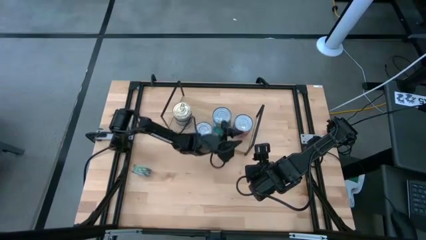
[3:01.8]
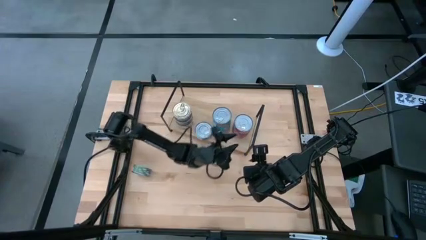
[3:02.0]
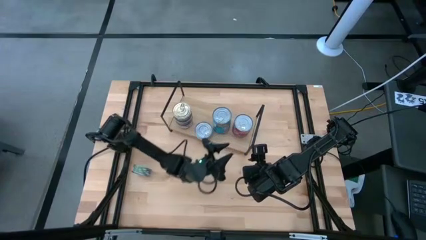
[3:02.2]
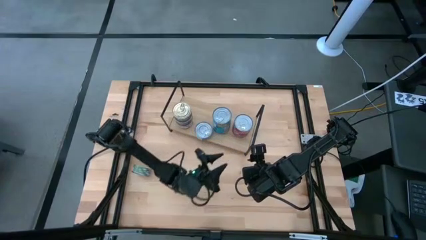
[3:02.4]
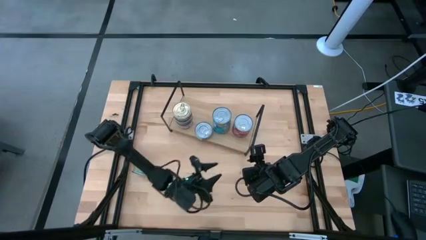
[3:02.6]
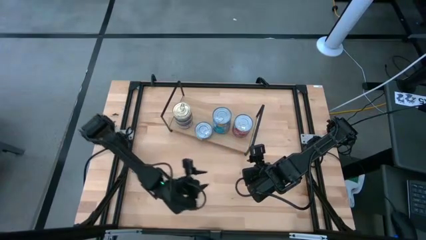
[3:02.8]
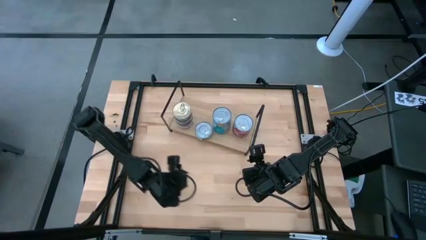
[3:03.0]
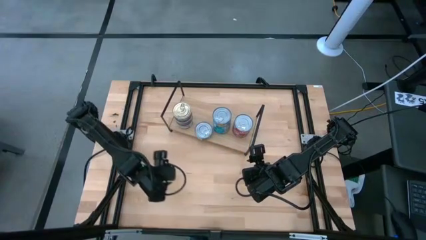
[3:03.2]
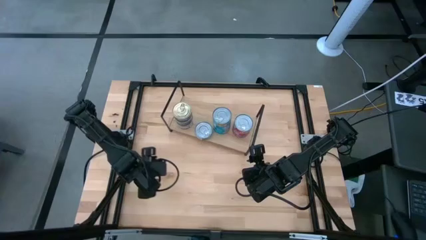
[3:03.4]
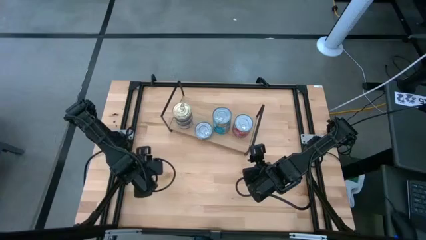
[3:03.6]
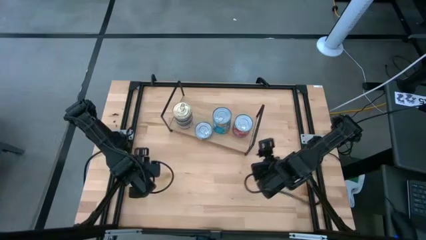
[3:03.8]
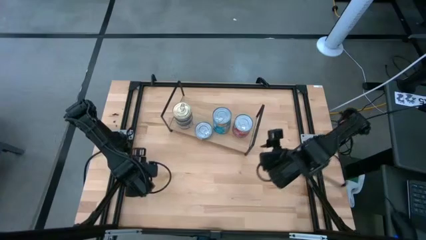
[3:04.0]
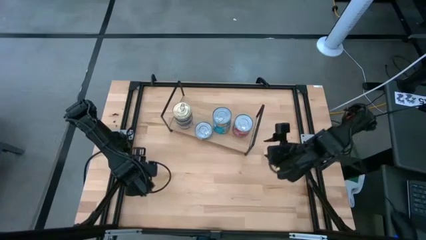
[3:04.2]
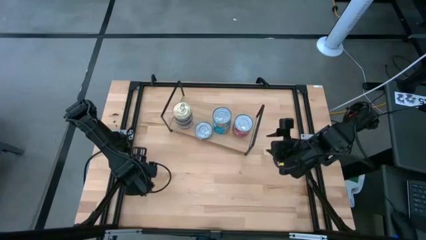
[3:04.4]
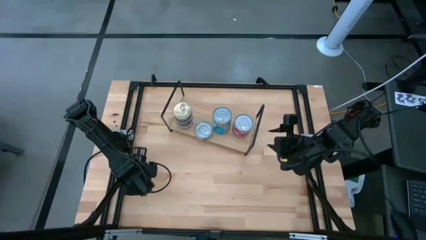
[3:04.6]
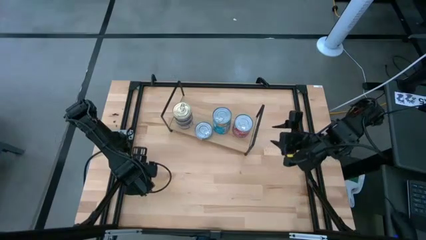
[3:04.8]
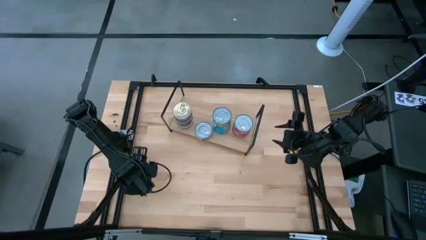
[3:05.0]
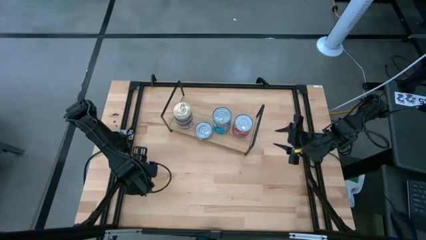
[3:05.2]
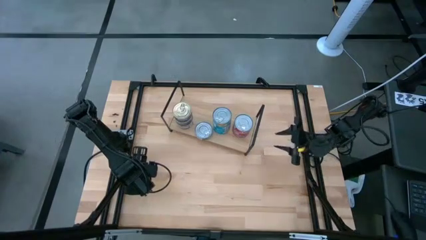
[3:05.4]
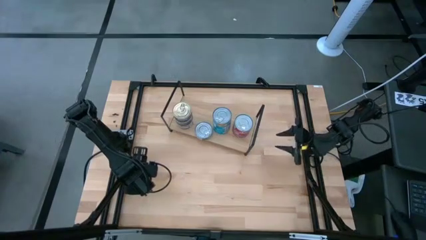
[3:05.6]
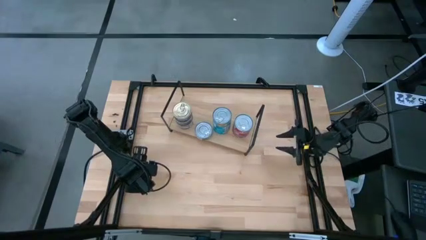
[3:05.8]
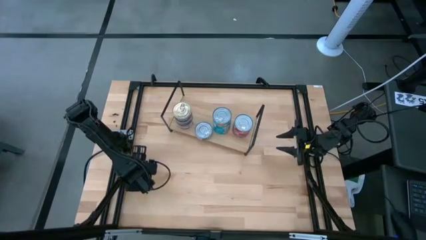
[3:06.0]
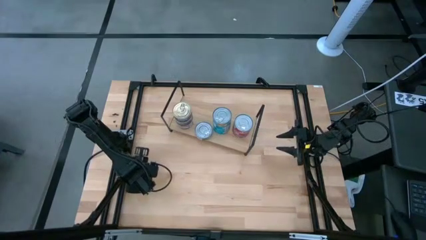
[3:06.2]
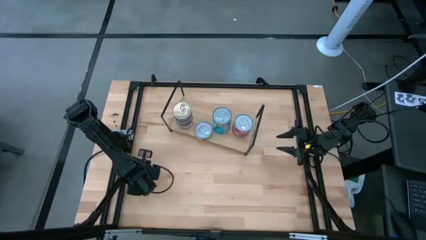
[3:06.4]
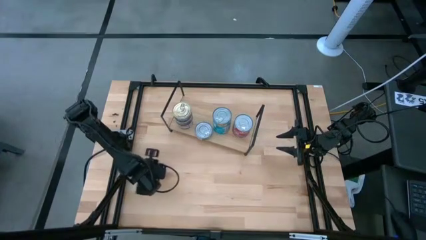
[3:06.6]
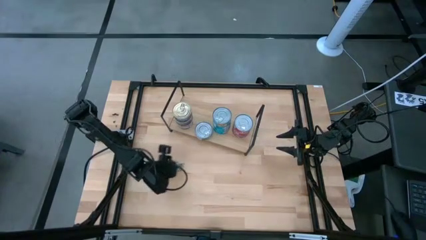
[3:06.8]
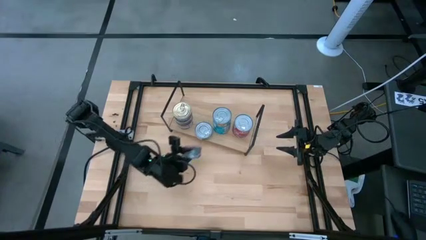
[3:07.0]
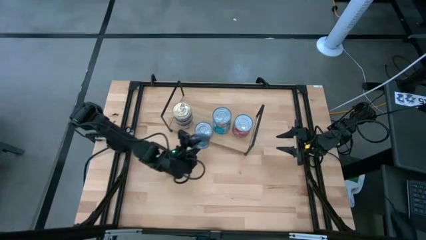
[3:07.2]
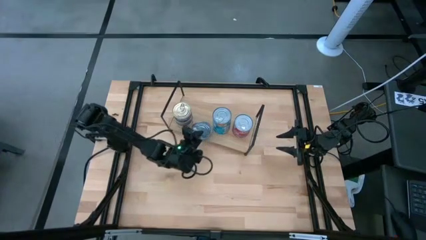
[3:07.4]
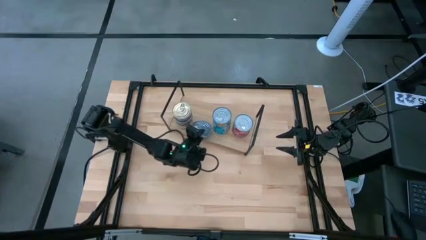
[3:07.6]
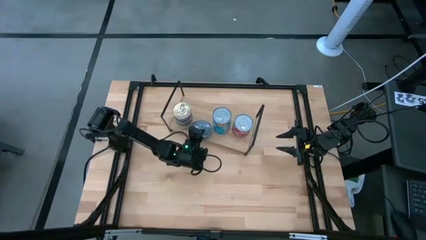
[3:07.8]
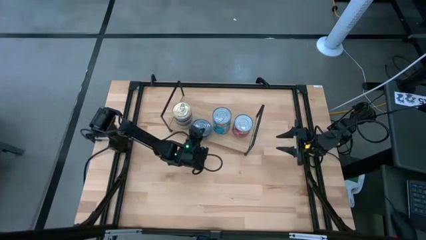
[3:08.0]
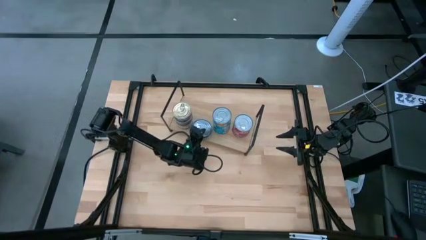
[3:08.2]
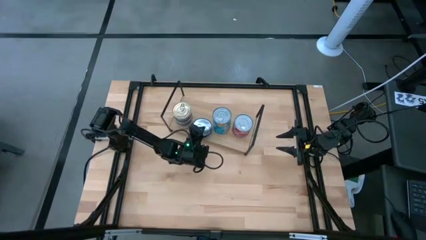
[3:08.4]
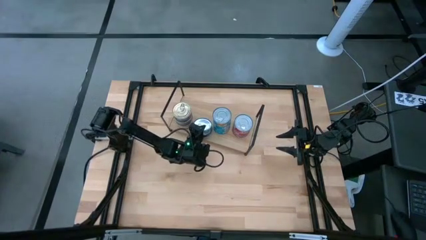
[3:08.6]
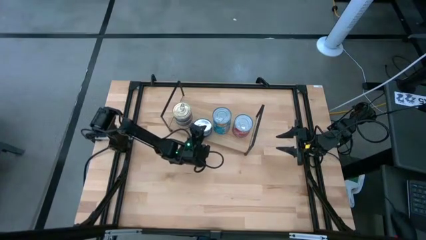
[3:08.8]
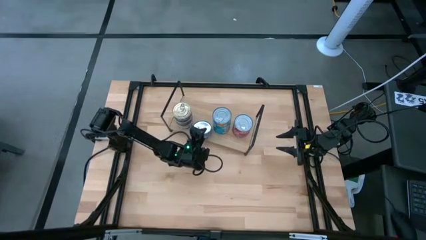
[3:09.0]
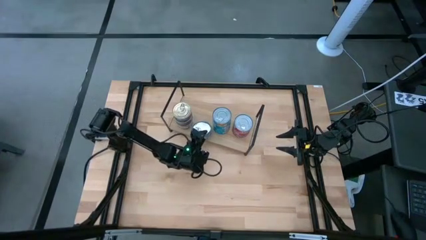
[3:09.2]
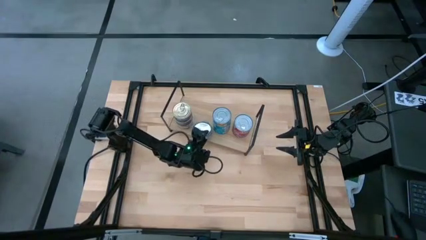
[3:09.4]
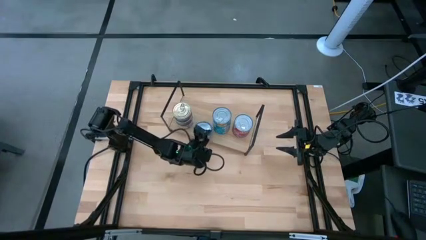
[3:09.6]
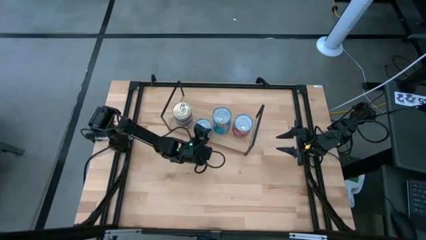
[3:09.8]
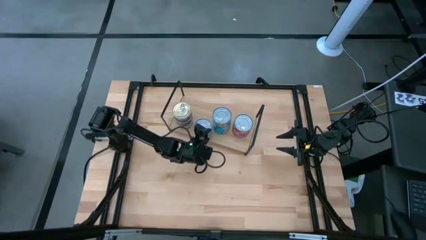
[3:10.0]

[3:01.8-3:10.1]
Task: Stack canned seafood by type on shelf
Stack the green tuna can on top of the green tuna can on the shelf

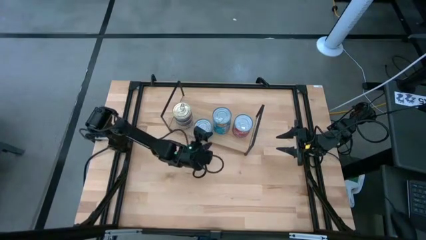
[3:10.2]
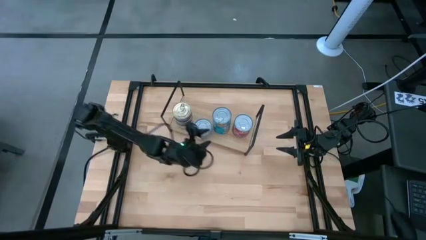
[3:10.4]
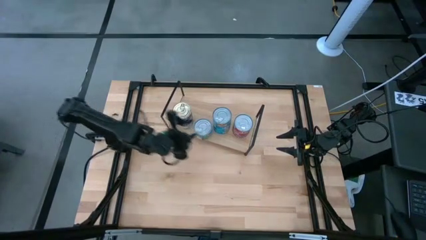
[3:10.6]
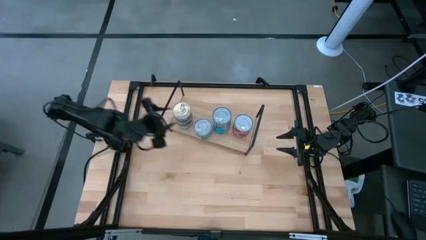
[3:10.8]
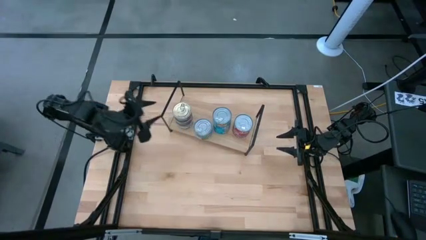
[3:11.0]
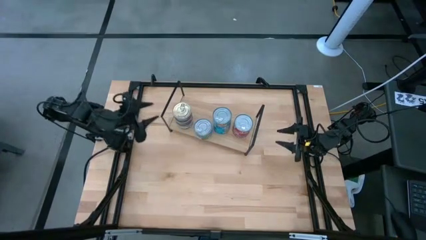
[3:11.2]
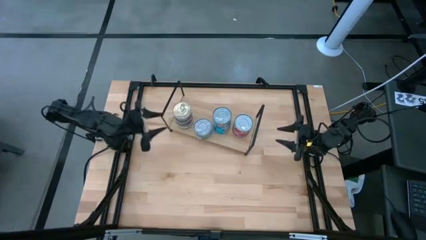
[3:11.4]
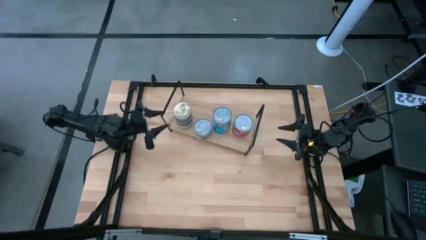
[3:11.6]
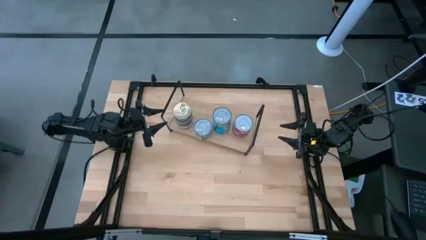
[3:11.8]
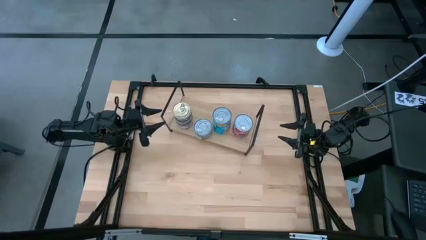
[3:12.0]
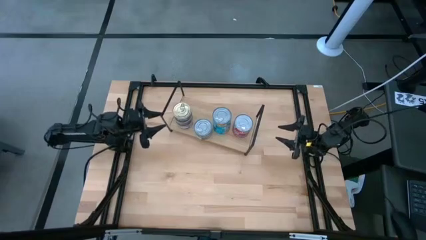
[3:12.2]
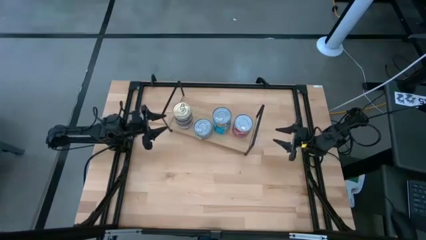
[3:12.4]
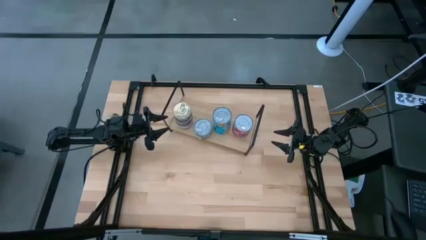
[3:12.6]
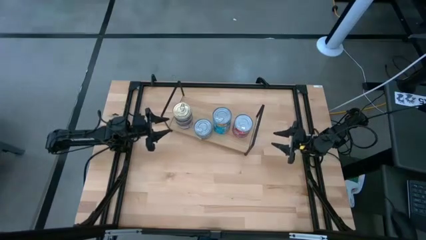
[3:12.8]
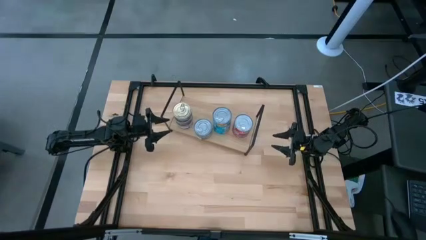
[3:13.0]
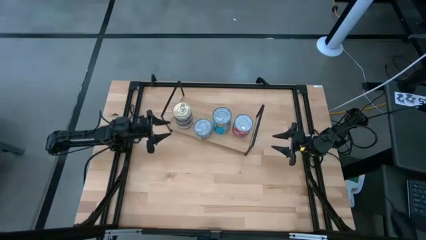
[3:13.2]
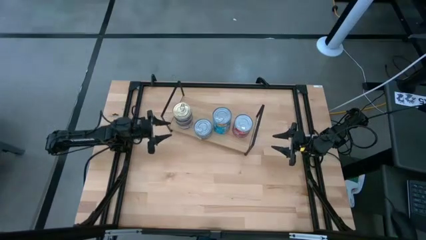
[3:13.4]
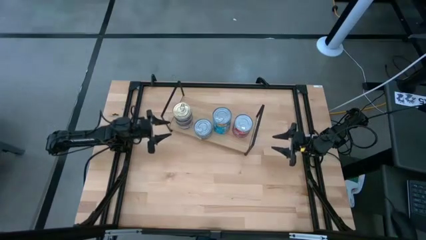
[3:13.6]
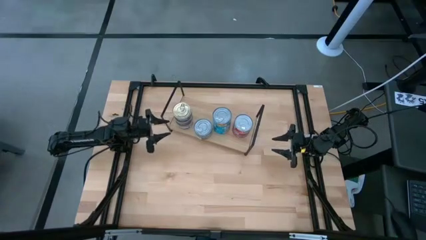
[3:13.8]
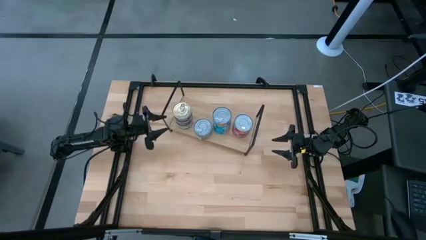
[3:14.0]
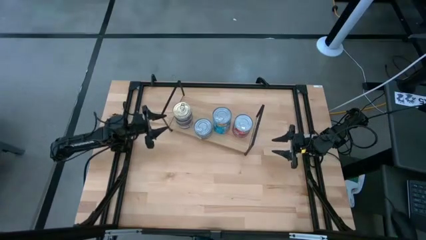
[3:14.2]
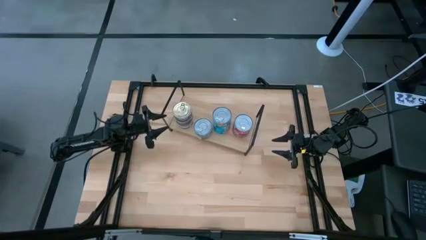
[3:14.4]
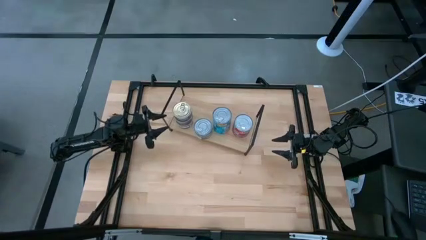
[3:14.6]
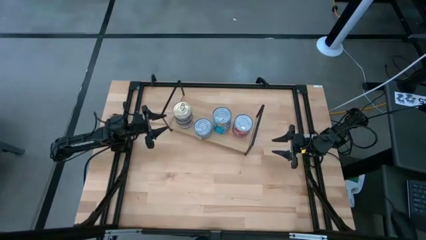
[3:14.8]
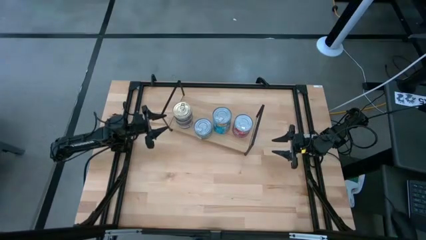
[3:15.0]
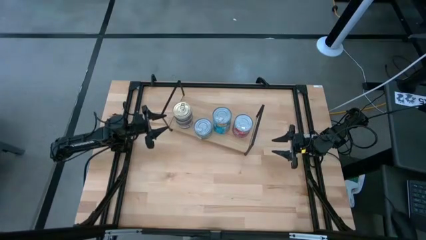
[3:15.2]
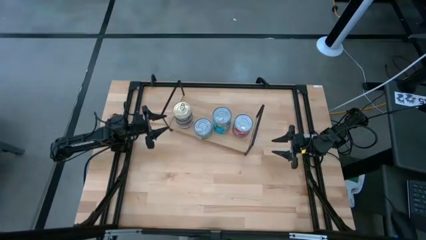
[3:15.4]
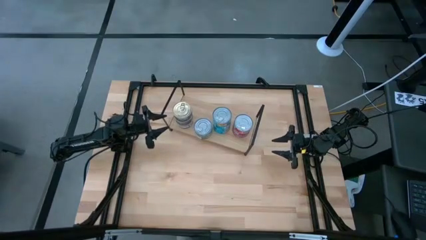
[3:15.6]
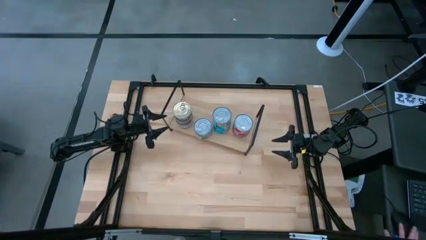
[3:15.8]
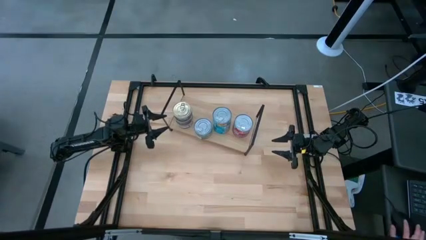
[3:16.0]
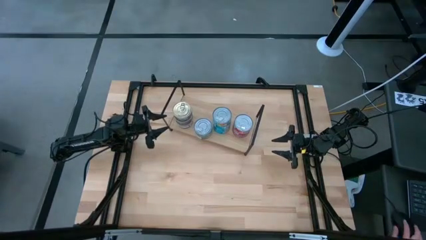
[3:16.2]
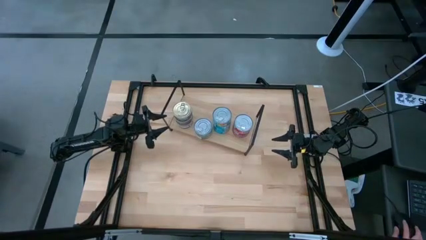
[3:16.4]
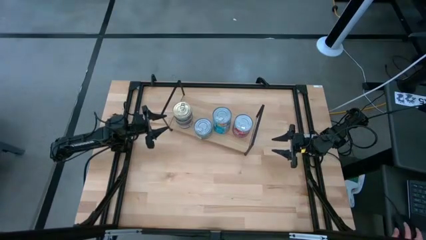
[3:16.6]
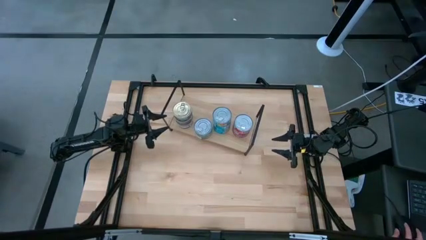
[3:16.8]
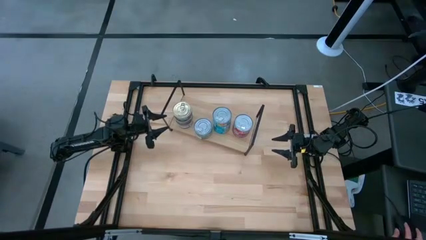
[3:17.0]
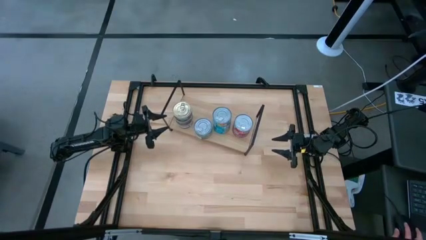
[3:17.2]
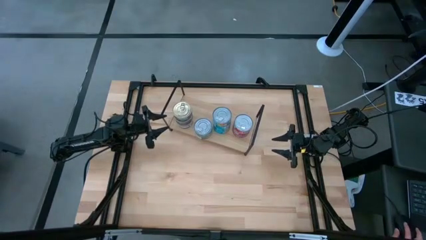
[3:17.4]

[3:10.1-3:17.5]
Return to Home Position

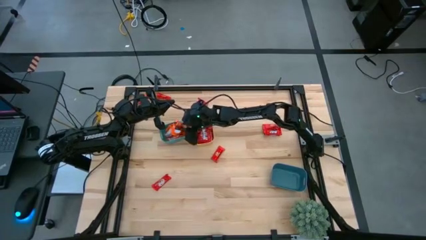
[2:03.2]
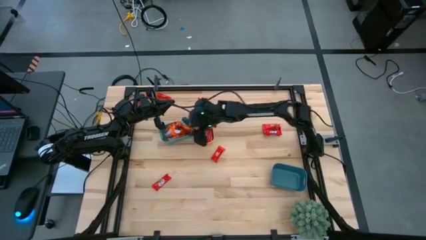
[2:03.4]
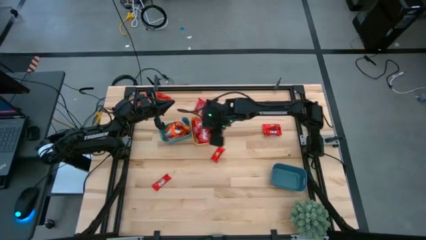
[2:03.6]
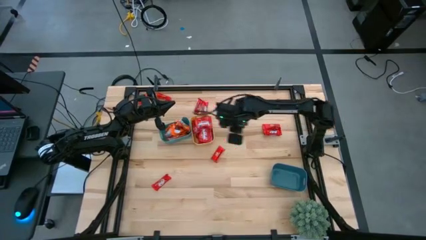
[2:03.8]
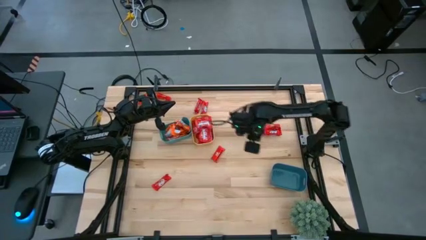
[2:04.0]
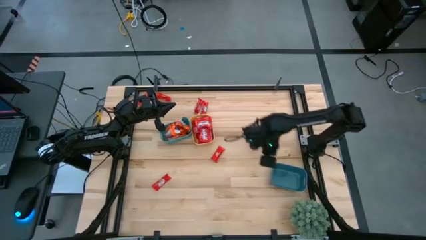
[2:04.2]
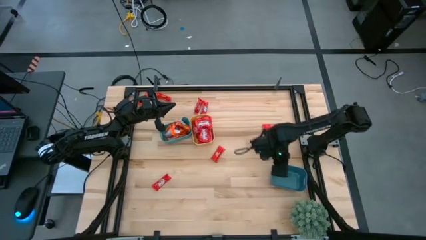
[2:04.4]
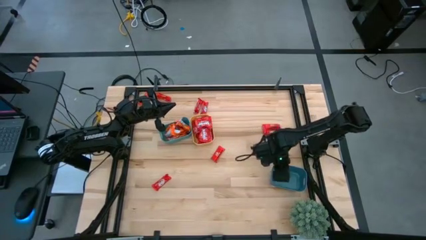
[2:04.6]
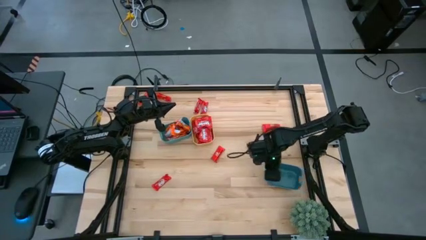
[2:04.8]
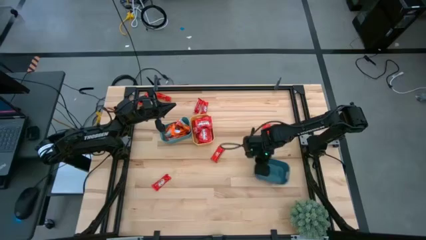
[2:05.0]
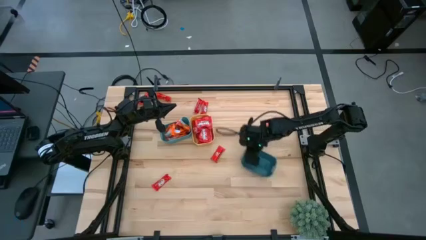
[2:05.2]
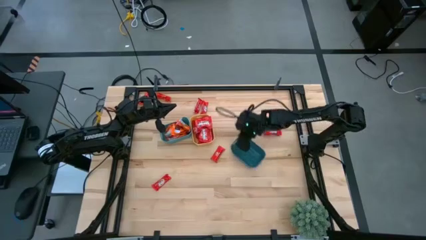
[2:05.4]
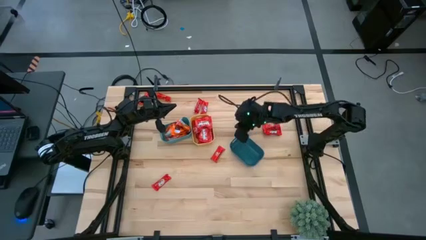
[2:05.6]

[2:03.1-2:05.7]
Task: Sort candy
Move the blue bin to the center of the table
